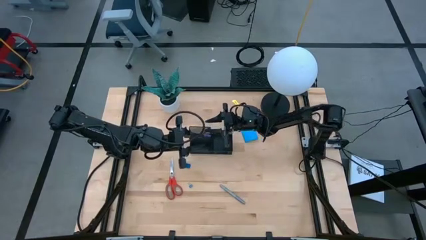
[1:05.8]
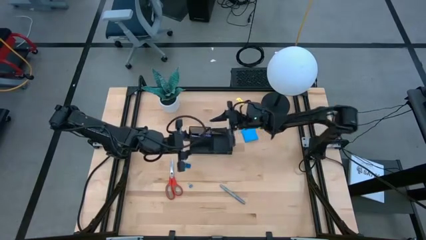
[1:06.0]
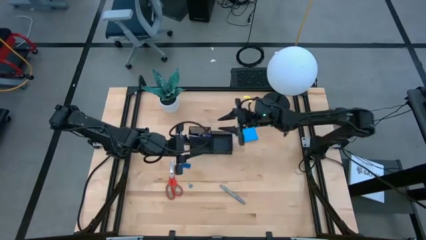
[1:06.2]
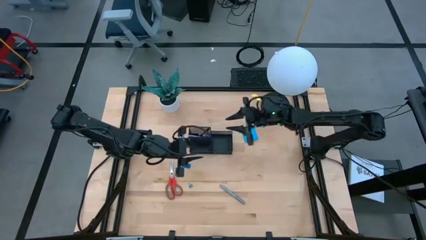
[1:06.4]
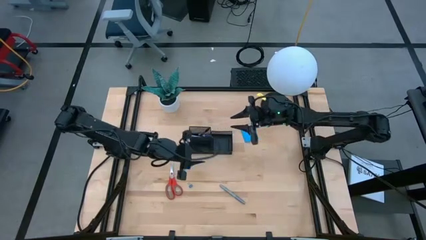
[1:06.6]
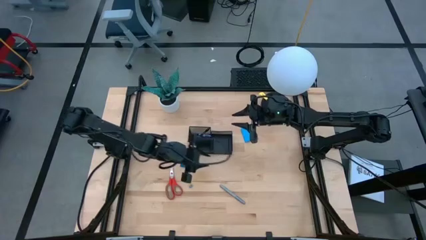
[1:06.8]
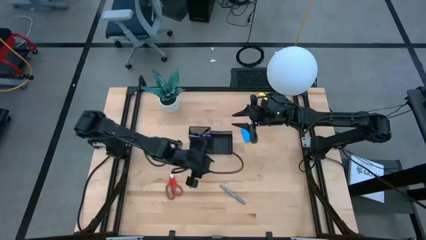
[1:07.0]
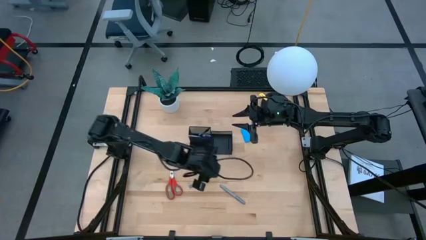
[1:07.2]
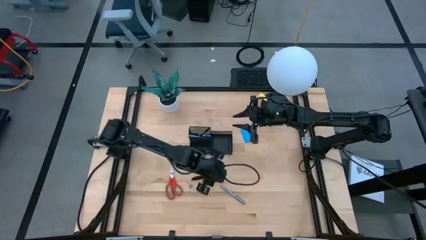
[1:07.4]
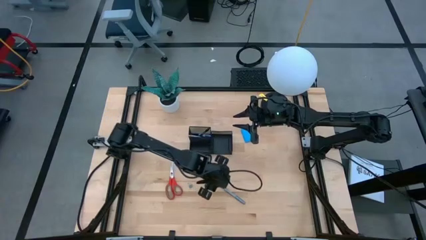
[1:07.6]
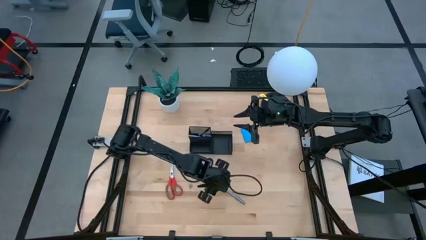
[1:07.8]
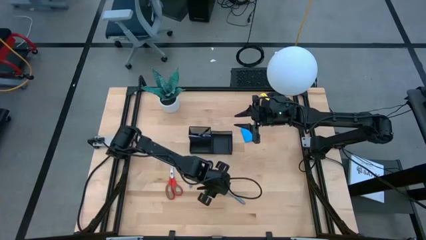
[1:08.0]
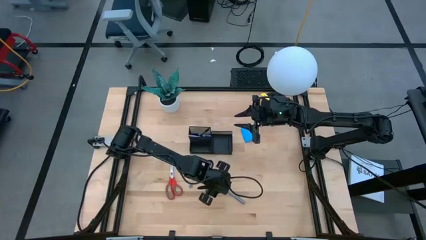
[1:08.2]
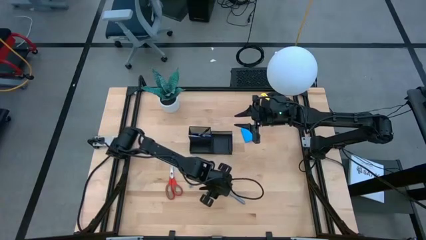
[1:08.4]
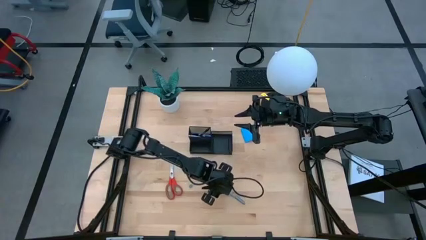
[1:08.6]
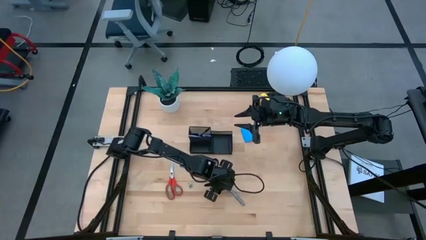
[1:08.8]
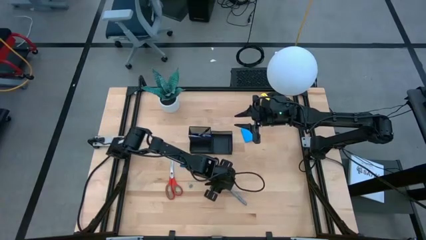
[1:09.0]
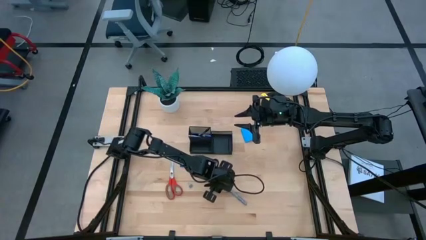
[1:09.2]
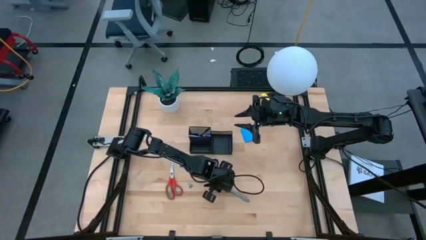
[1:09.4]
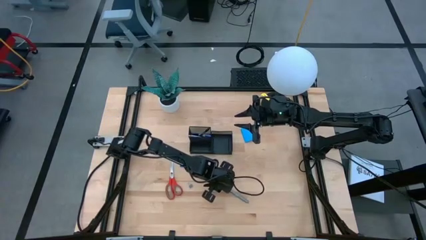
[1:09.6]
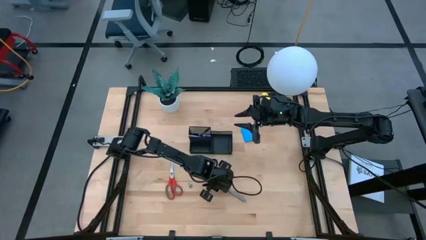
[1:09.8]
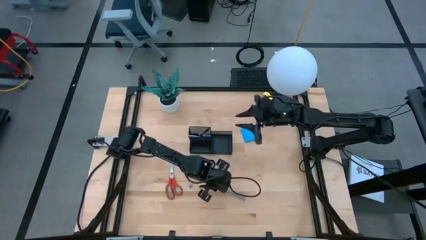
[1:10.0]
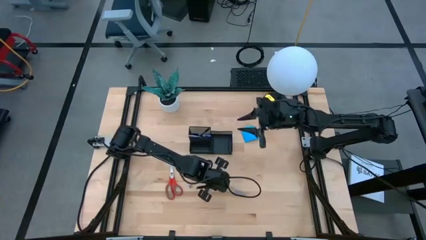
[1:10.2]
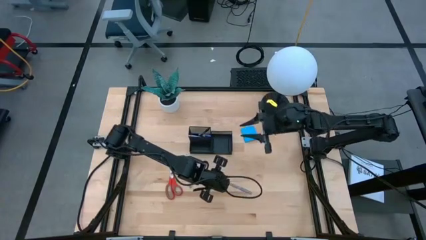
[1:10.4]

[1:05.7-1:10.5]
Task: Pick and place office supplies into organizer
Put the gray marker into the black desk organizer

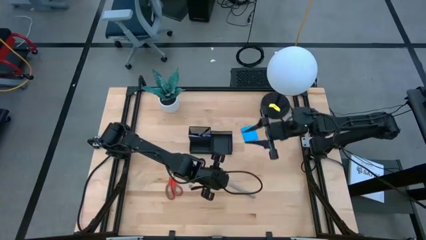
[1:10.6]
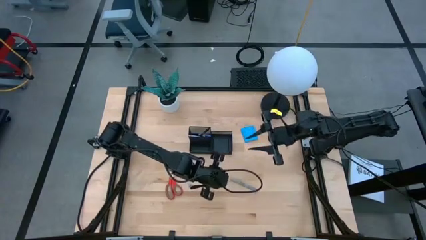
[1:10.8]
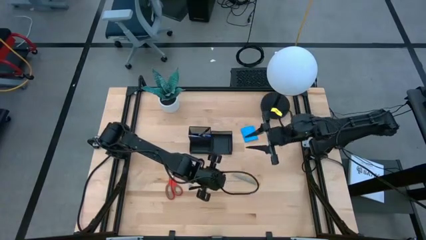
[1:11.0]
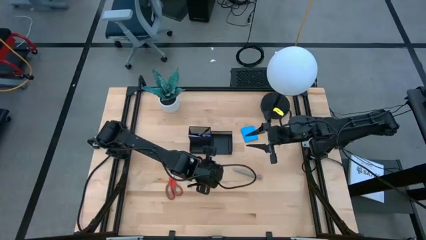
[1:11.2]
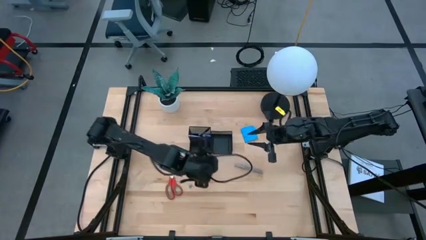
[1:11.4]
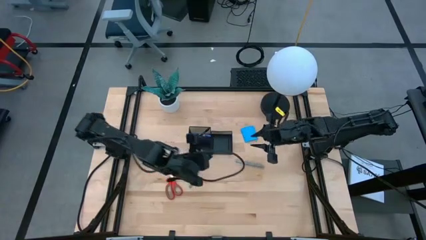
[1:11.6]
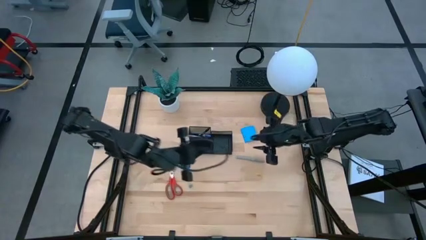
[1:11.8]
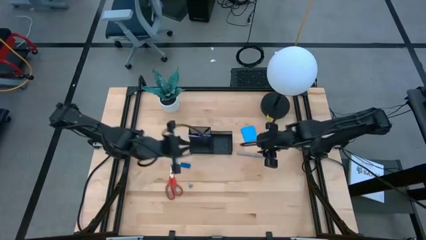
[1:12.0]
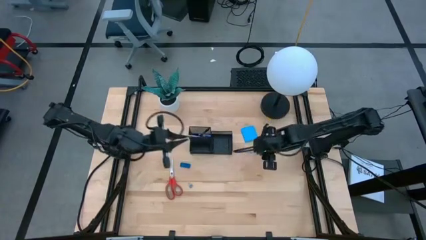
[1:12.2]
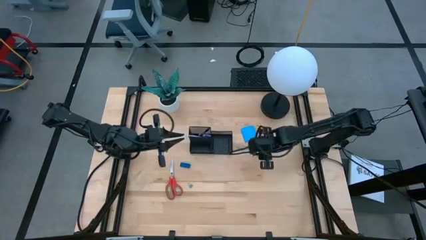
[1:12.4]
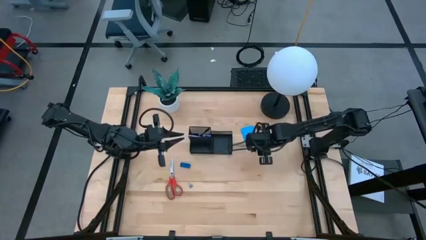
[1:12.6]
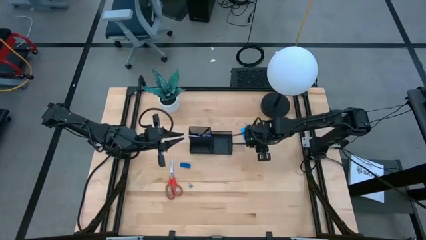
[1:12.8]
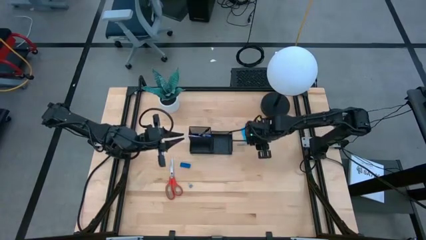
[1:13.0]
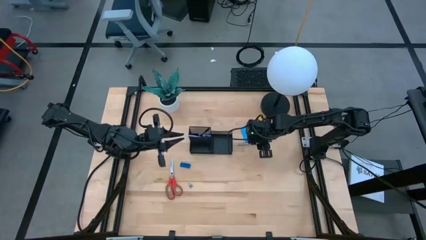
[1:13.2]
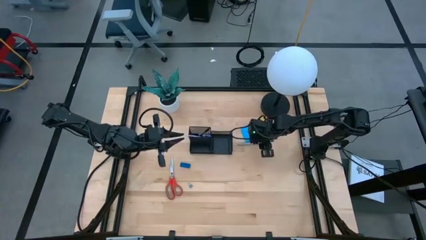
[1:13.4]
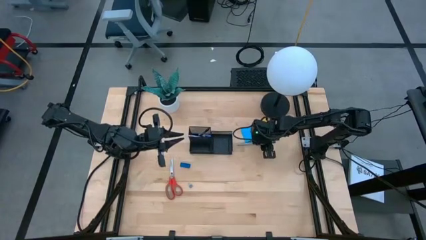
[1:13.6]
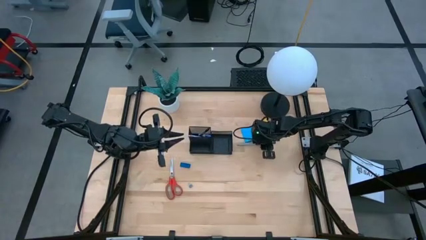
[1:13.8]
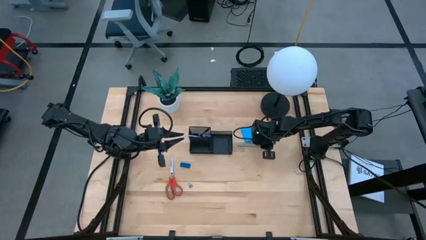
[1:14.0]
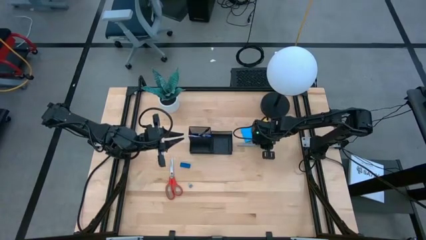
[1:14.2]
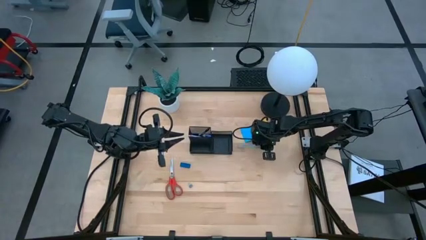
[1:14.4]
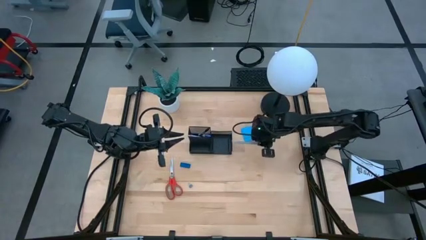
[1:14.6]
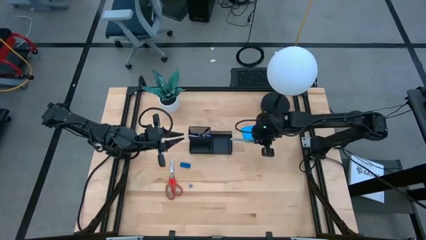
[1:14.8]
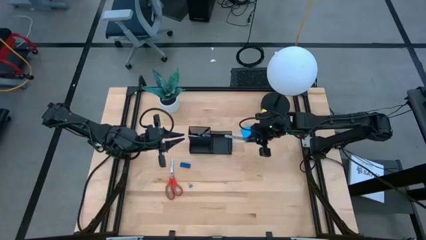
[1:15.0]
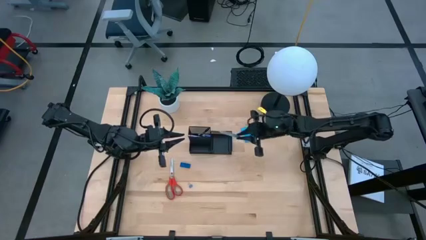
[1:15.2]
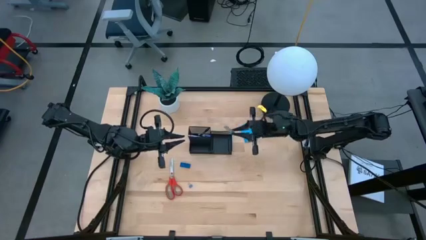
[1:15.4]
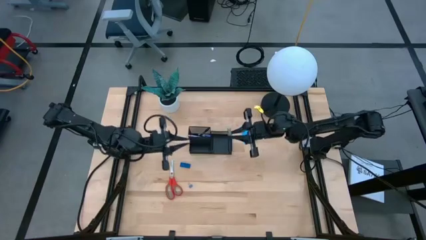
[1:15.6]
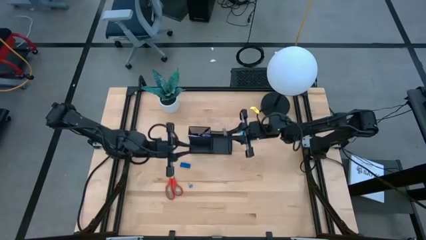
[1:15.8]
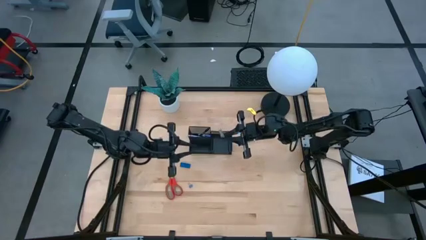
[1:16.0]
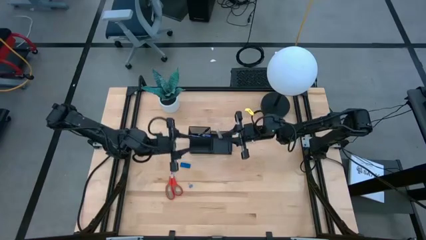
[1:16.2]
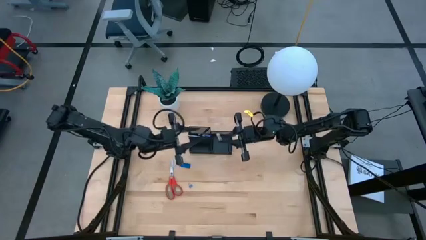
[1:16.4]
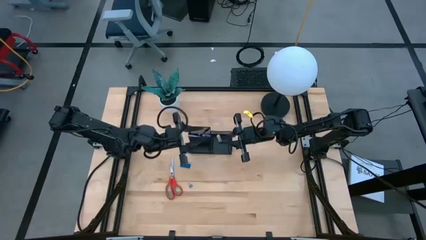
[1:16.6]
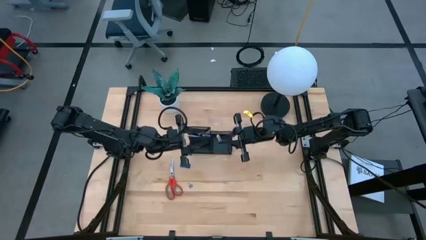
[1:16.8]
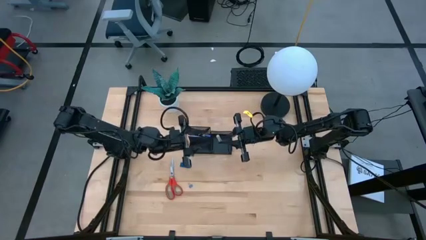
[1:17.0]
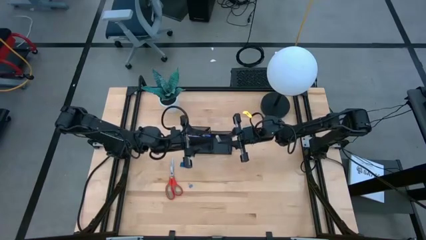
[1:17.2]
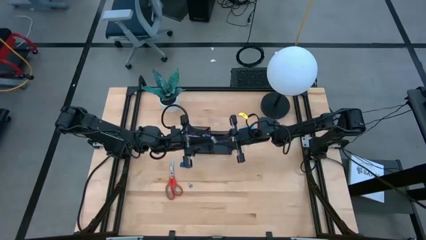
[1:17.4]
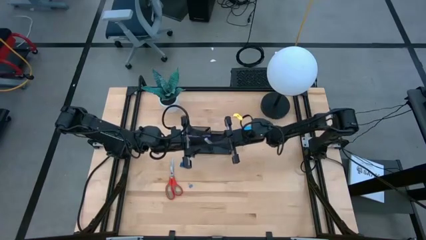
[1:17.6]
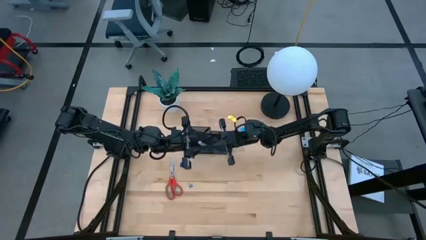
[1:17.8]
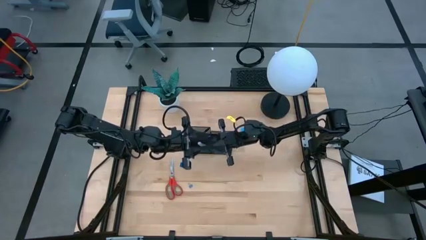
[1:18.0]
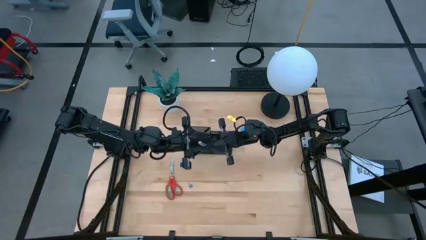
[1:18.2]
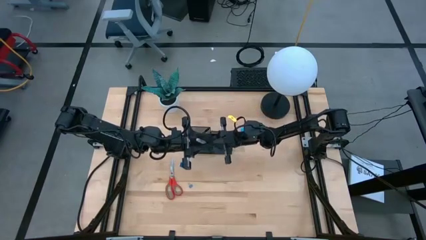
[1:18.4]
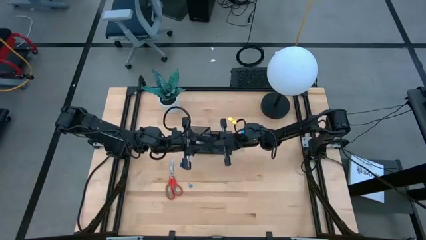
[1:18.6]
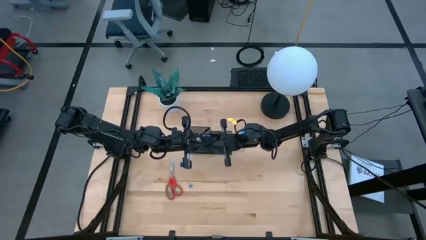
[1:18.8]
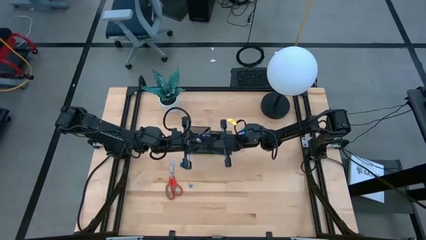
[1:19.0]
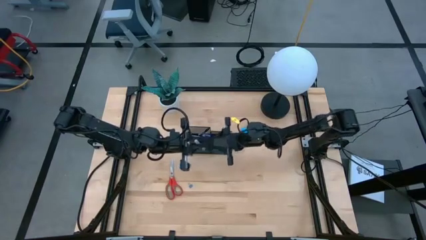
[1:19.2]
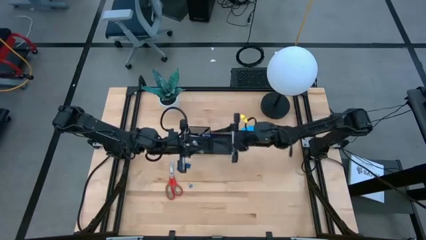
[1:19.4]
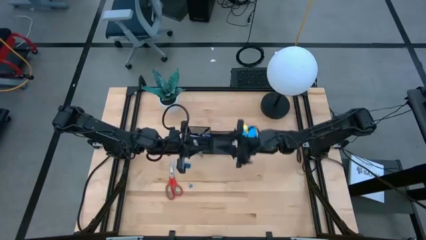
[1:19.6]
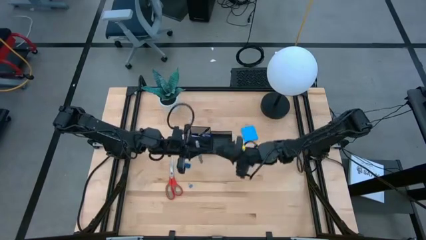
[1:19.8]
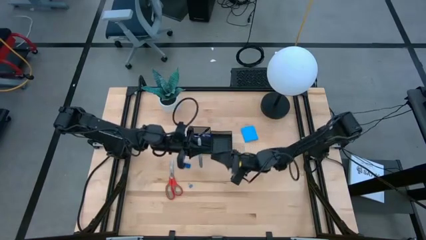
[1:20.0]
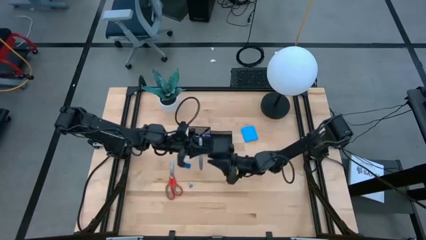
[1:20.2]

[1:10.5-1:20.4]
Put the gray marker into the black desk organizer
